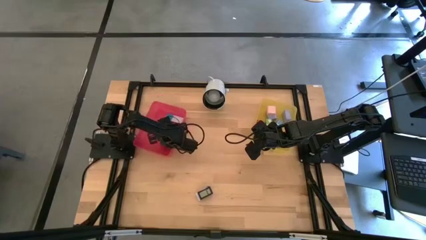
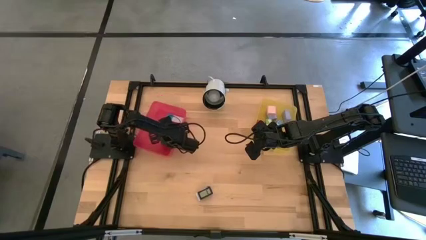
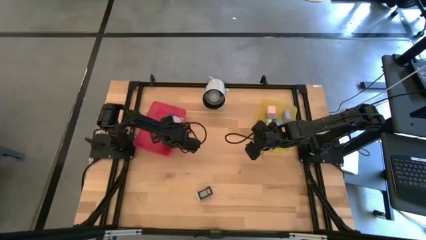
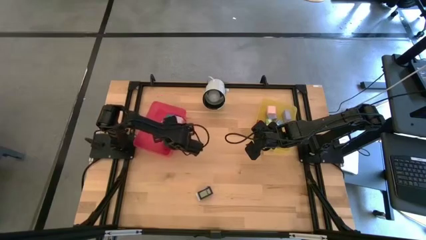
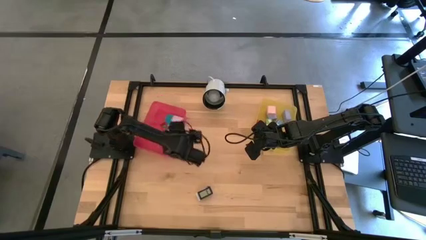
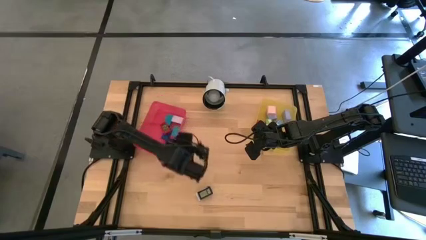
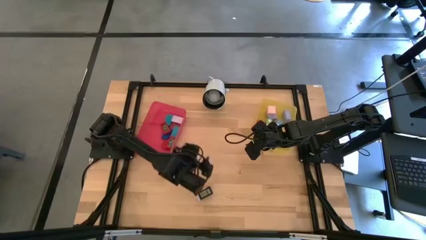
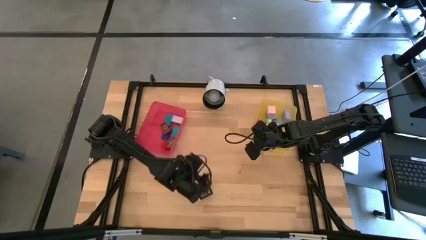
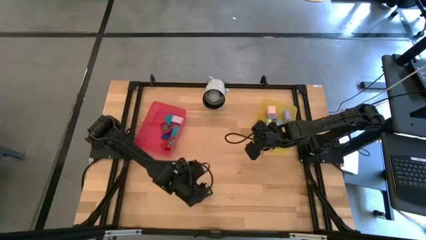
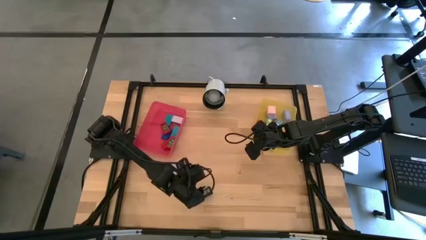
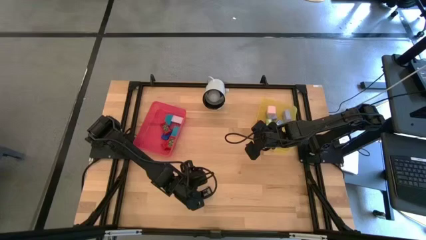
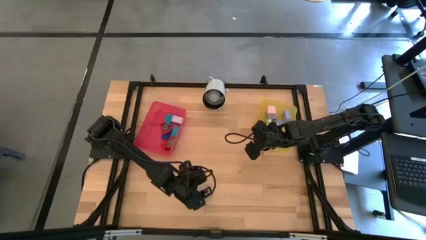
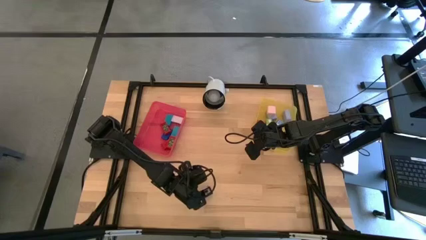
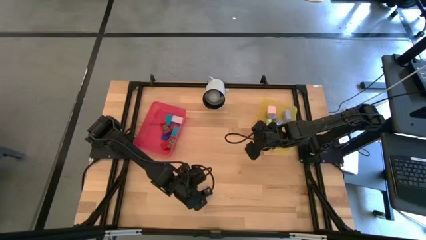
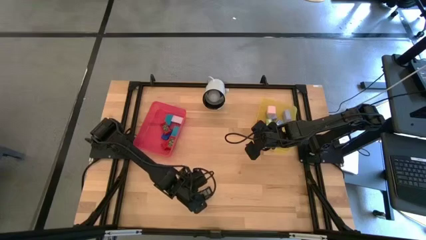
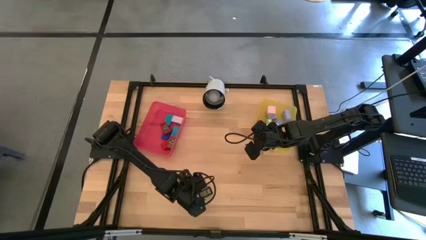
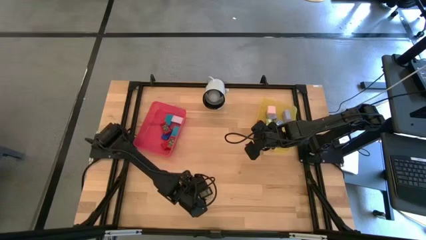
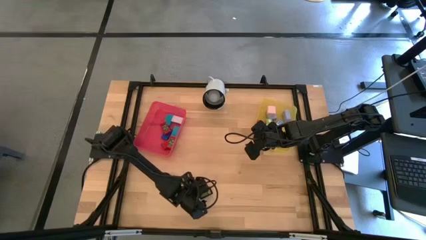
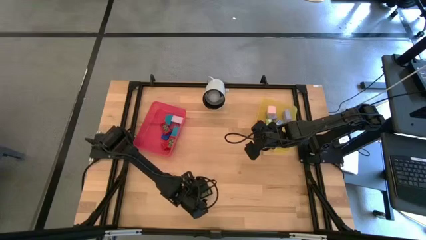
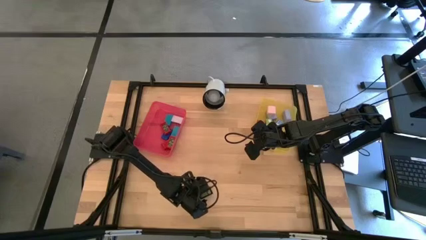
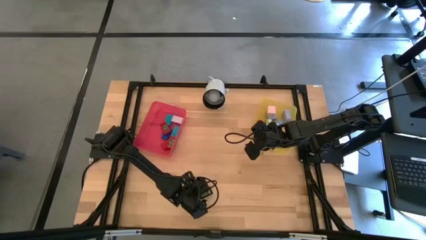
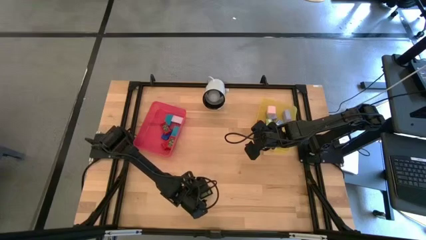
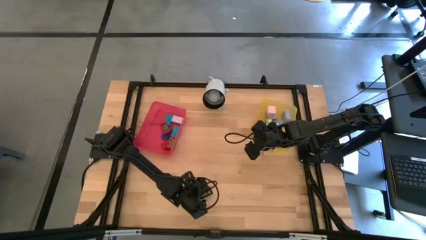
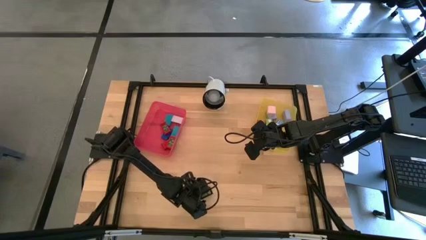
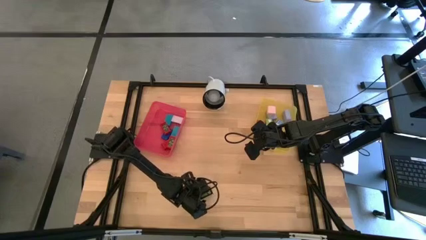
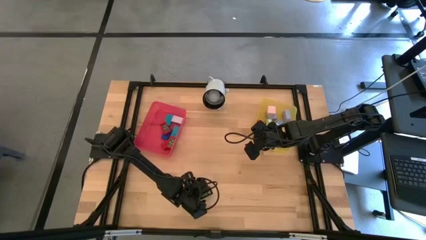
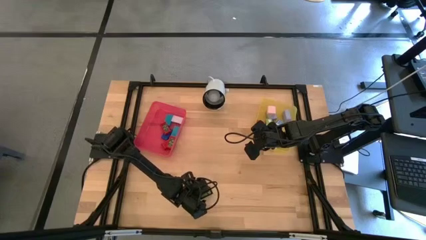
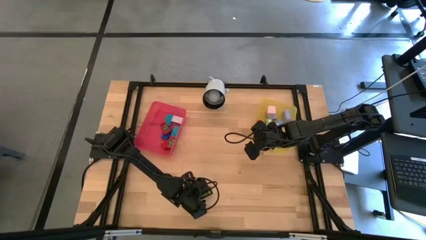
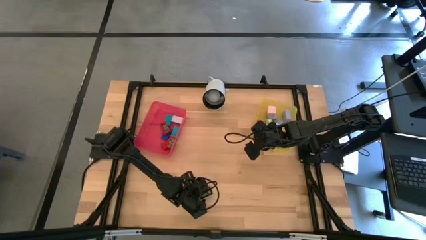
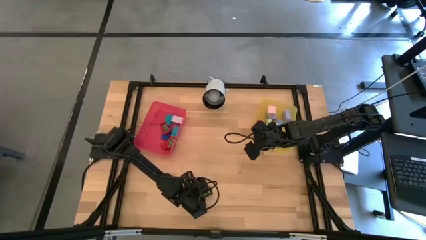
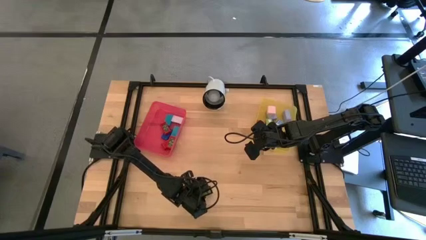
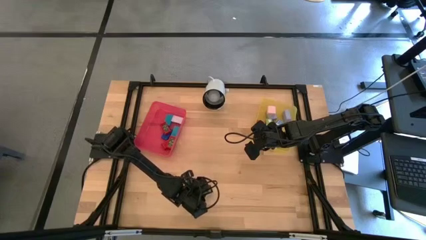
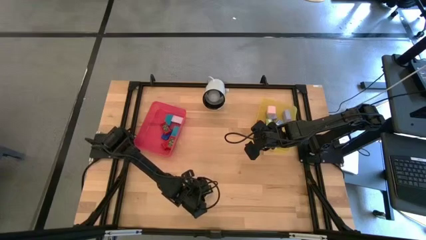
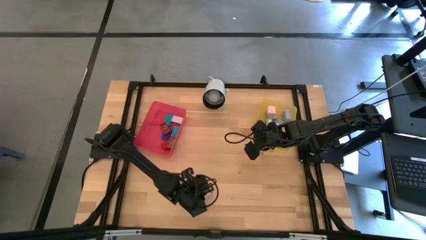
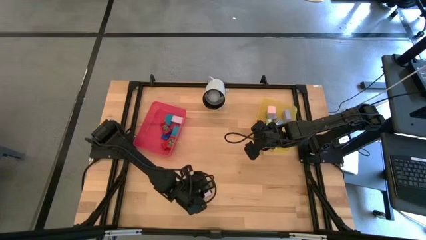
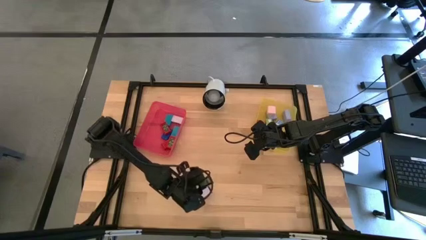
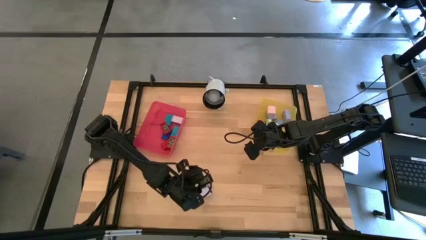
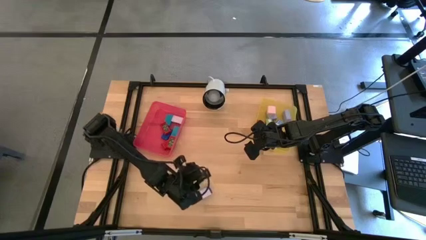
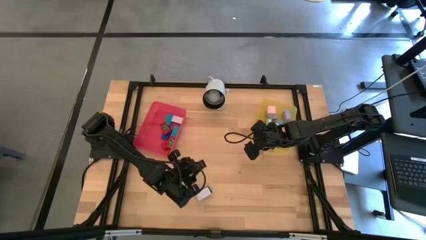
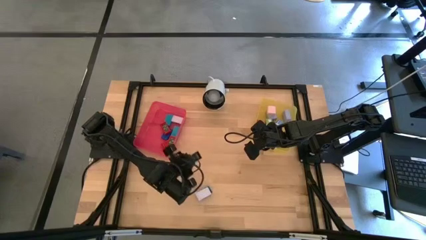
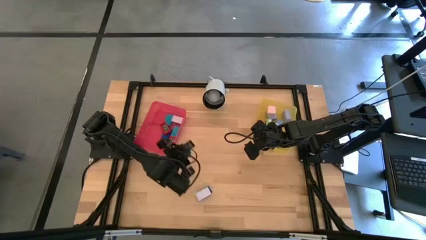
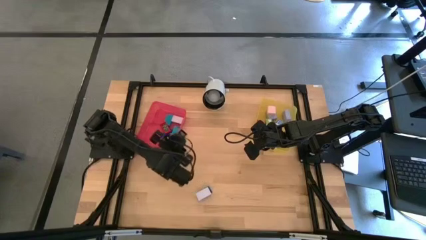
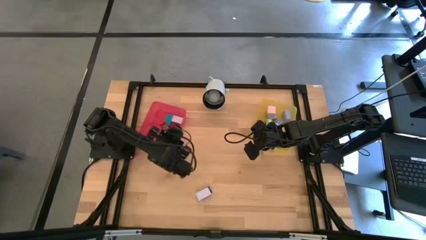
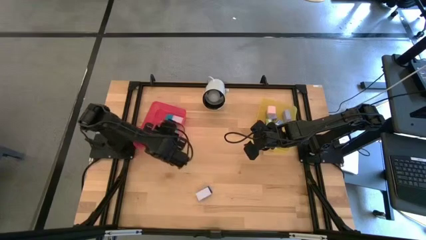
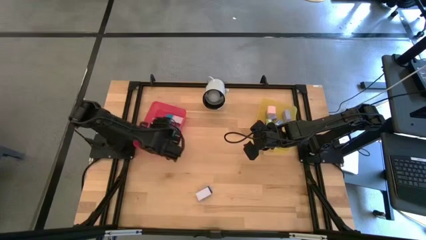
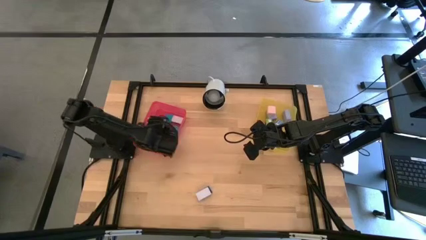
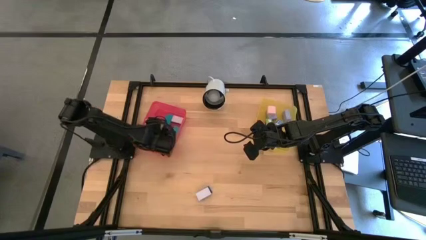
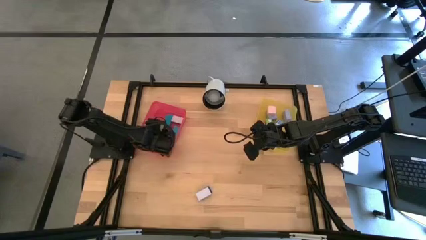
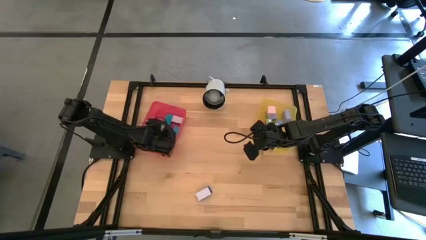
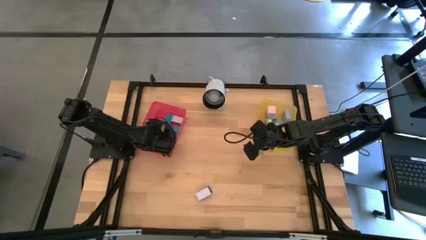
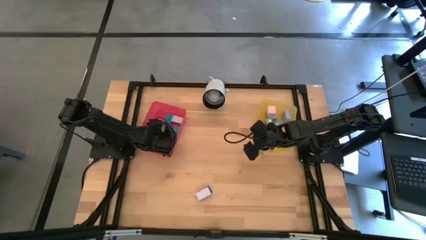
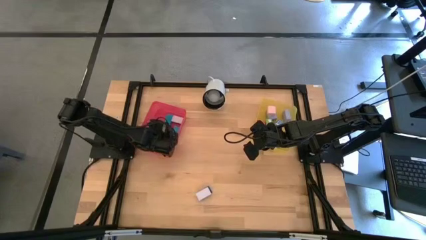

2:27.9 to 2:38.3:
Task: Pick & Place Office items
Put the black digital timer into the pink bin

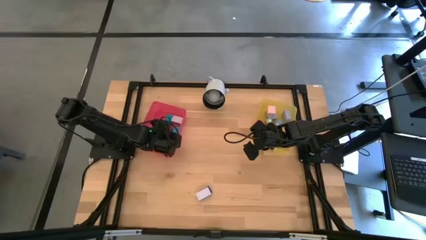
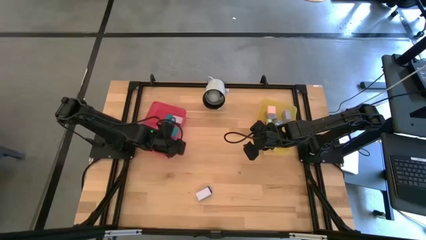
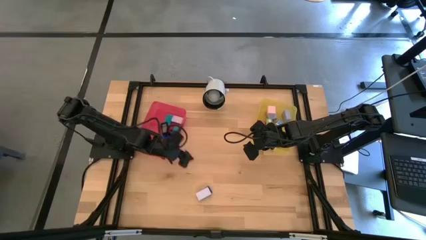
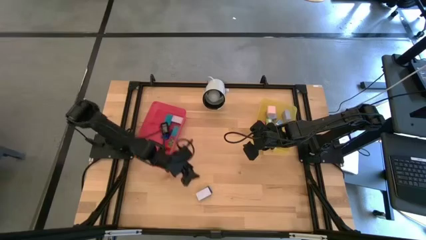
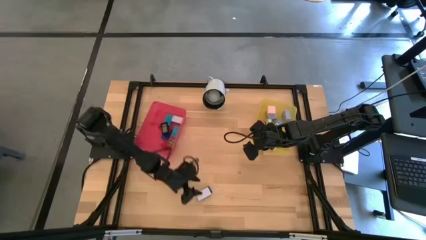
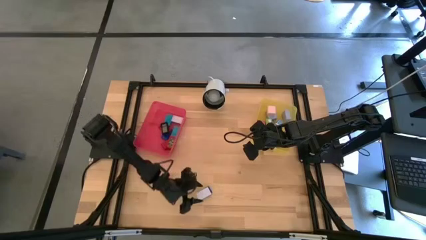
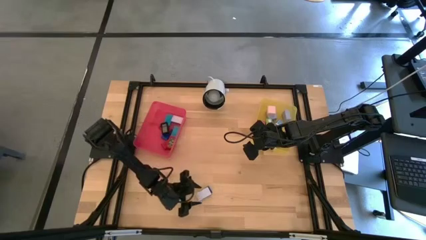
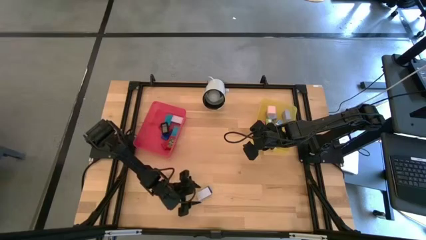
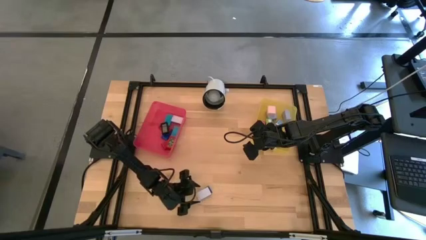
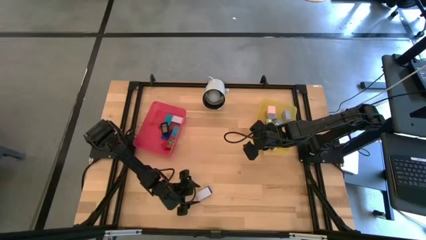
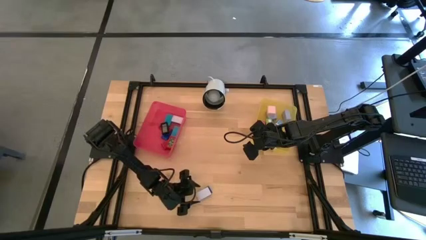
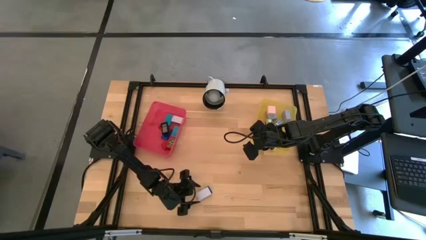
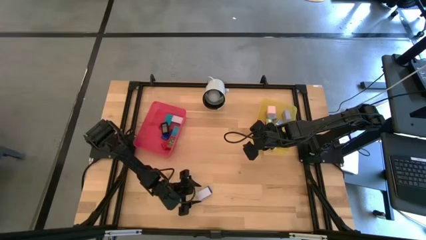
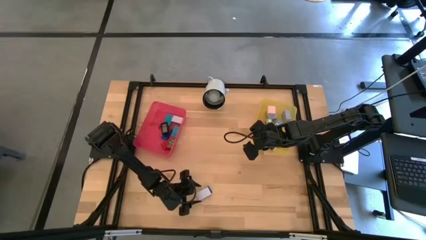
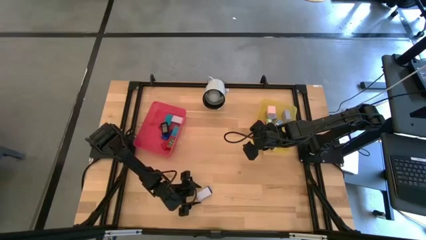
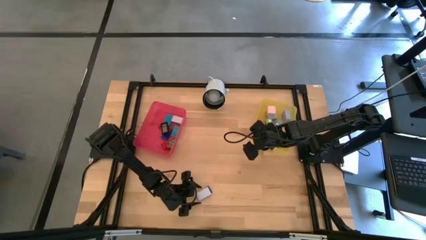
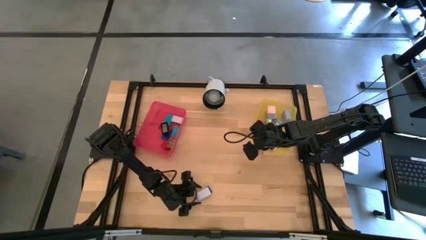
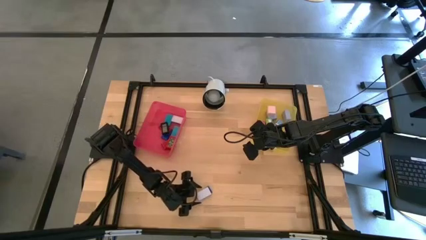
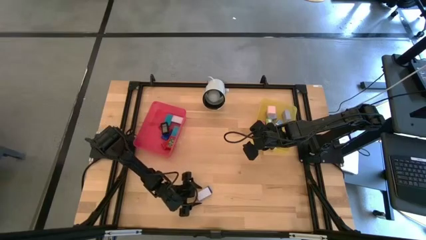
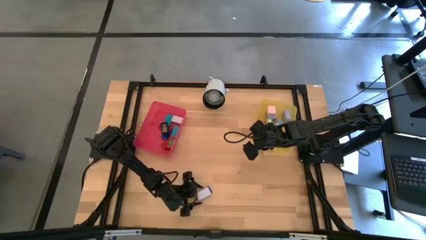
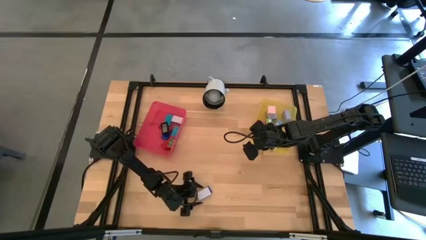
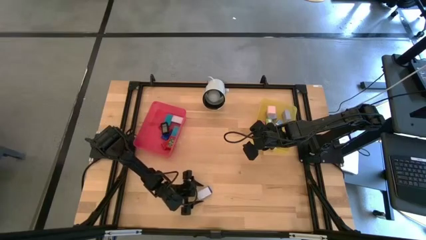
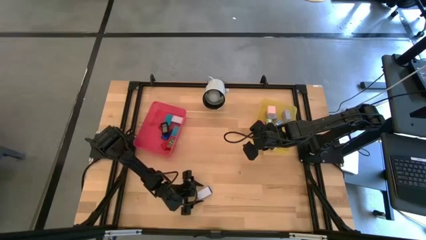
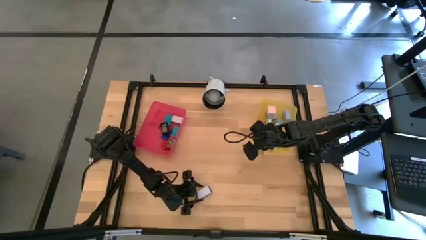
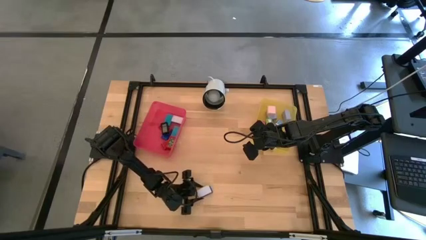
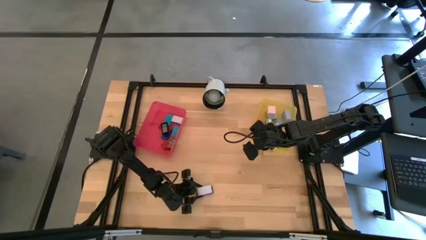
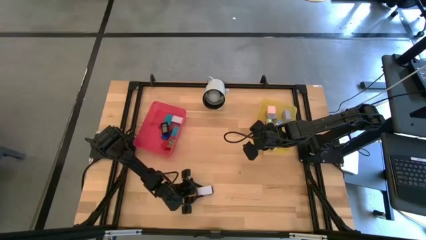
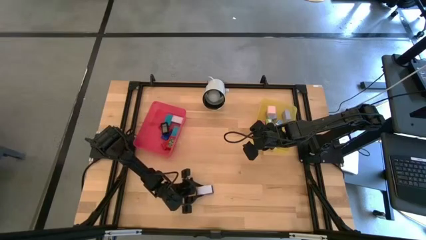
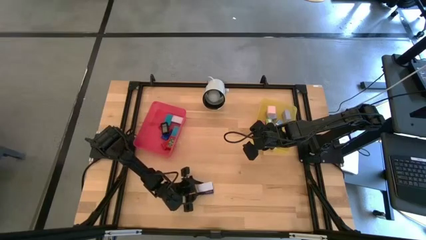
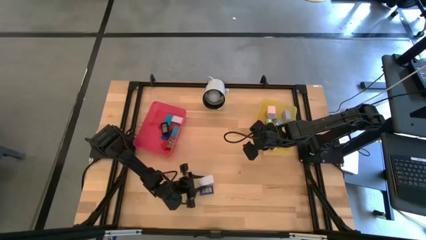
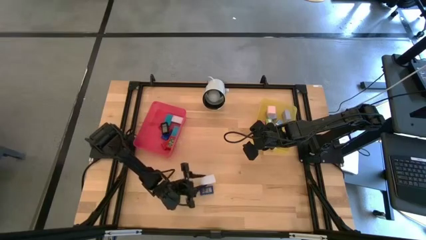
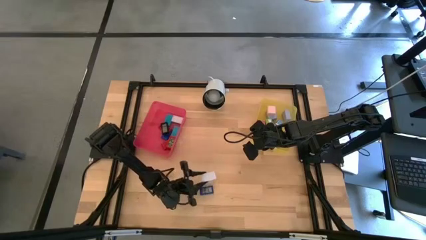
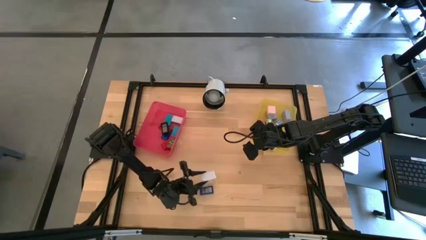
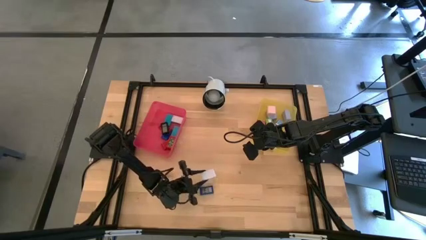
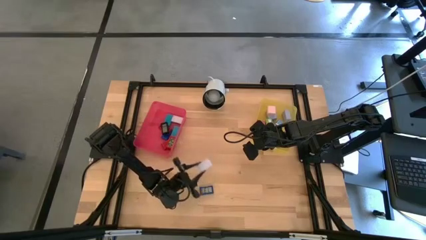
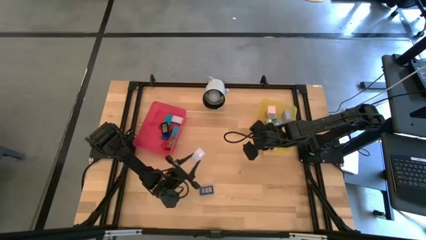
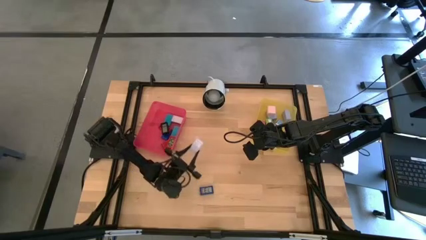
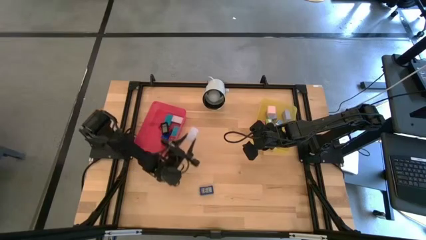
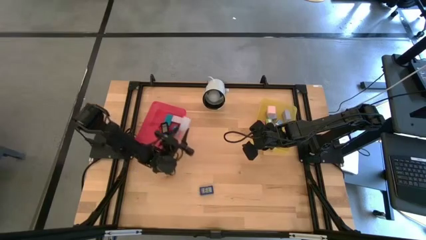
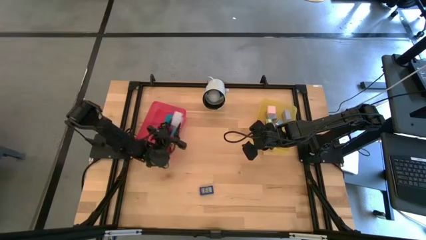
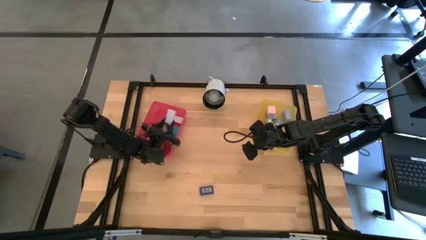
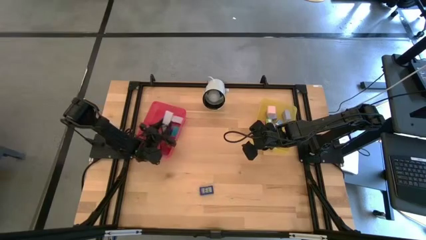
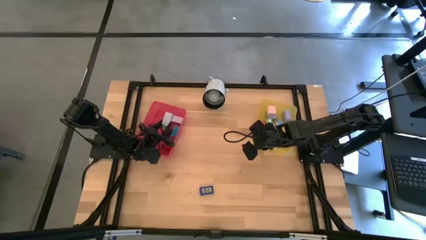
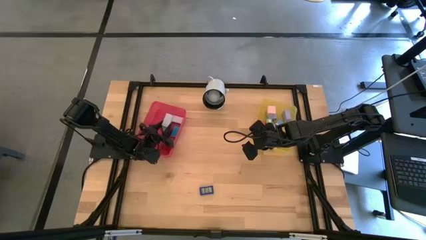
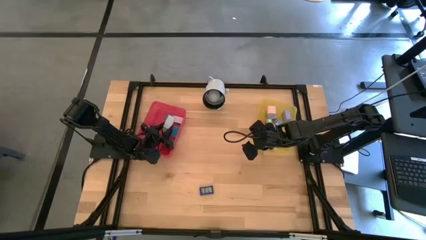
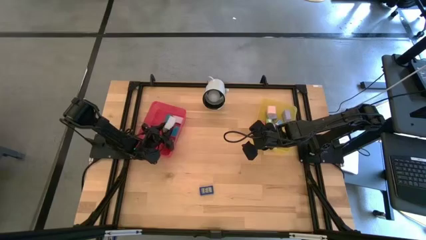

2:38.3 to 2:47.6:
Put the white digital timer into the pink bin
